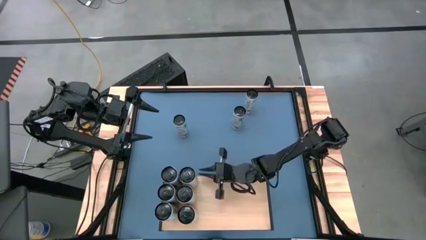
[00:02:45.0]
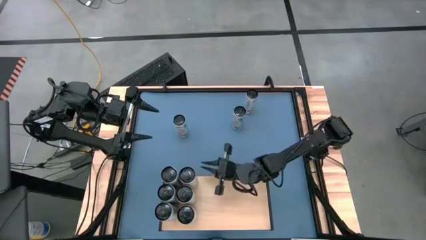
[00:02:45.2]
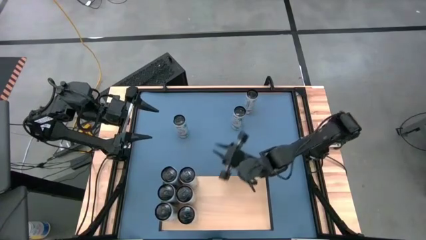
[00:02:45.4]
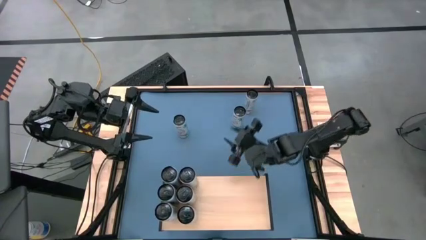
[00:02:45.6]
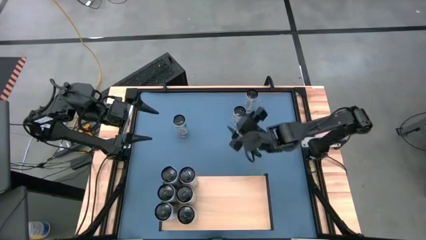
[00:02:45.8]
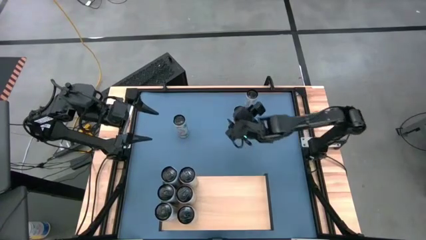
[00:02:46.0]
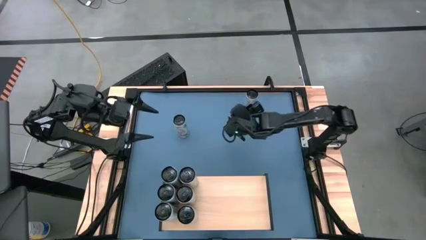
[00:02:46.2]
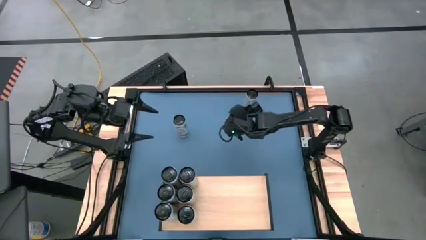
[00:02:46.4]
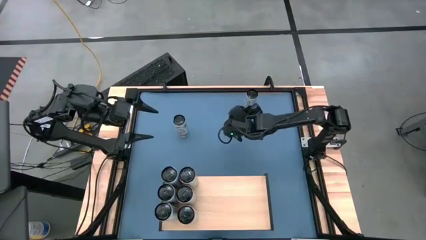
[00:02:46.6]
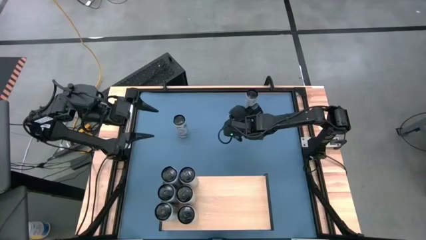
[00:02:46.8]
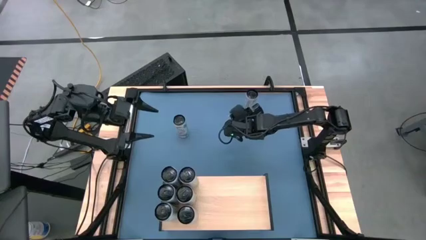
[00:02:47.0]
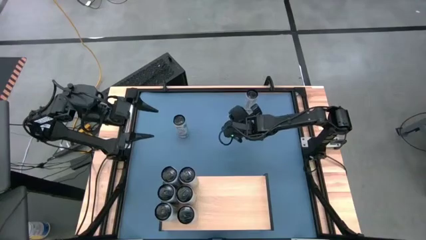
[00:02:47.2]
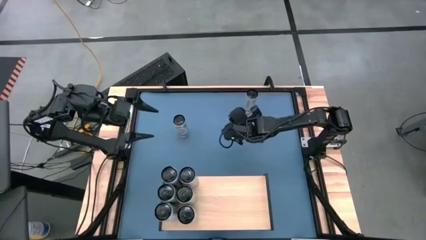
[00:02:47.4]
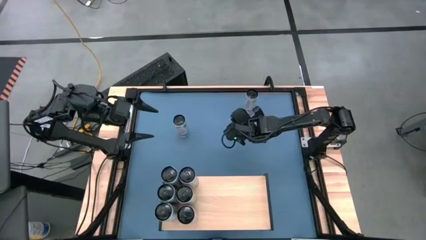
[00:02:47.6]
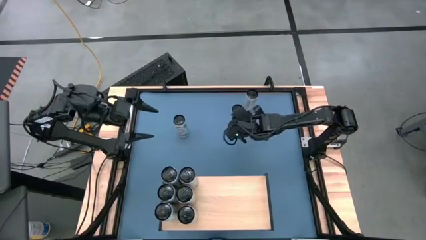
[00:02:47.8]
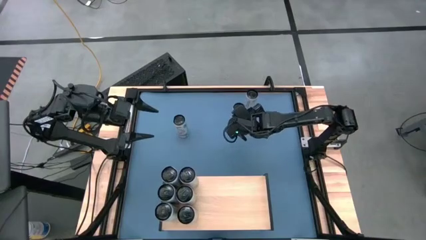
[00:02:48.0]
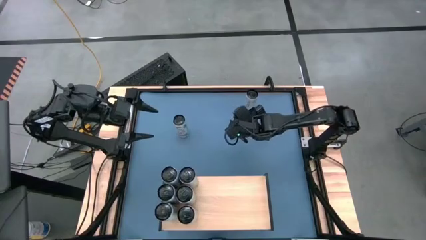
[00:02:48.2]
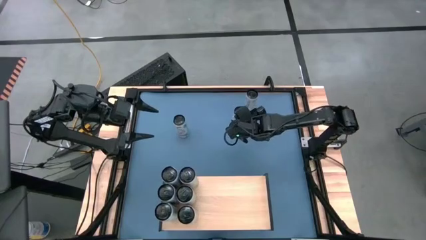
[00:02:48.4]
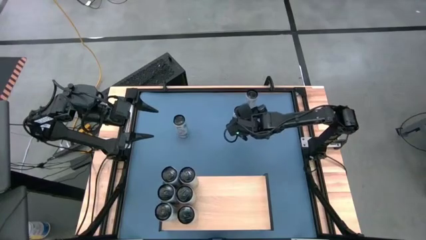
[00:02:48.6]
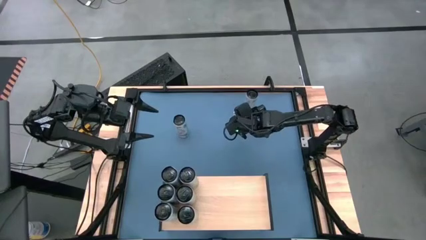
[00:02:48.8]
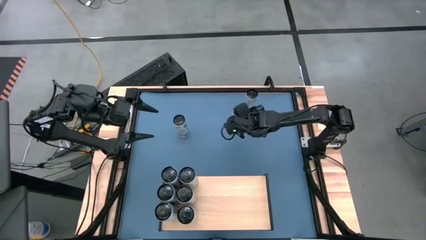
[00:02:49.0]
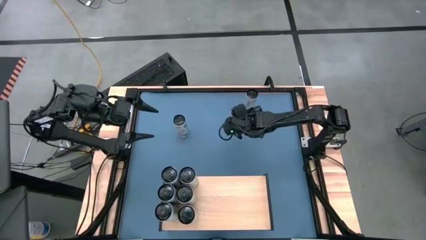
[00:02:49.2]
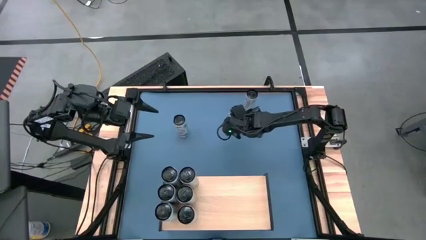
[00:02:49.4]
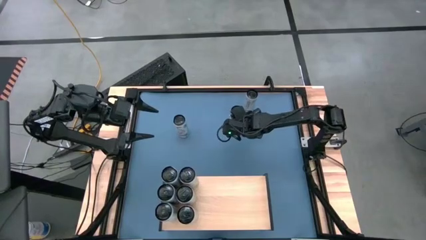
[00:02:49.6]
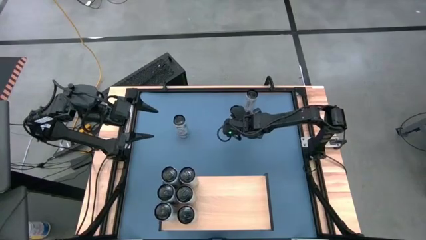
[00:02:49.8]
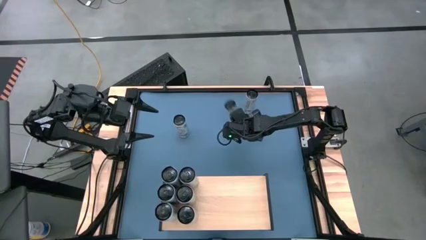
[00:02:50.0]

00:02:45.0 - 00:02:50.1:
Task: Place canned beverage on shelf
Put the bottom right white pink soda can on the shelf

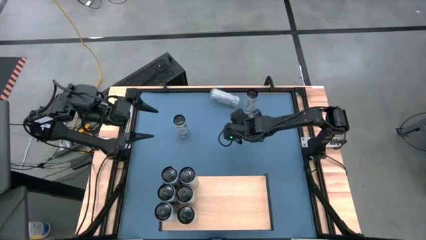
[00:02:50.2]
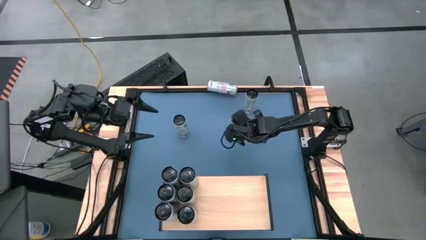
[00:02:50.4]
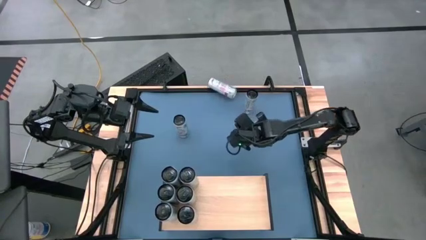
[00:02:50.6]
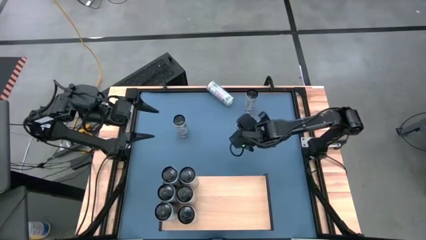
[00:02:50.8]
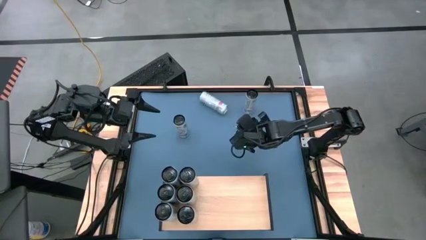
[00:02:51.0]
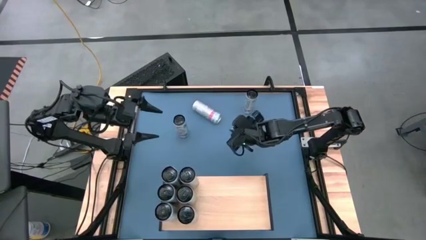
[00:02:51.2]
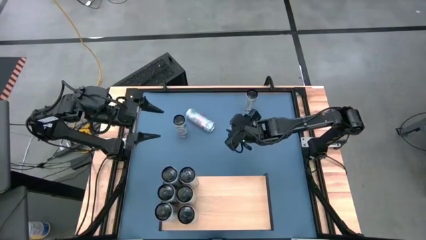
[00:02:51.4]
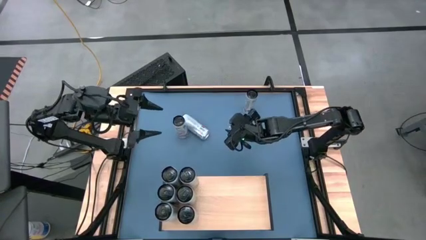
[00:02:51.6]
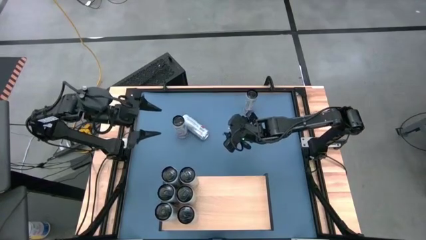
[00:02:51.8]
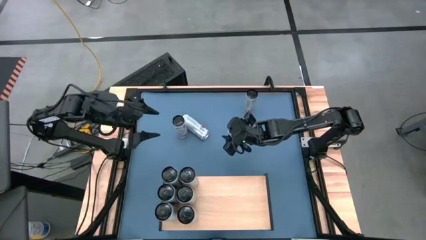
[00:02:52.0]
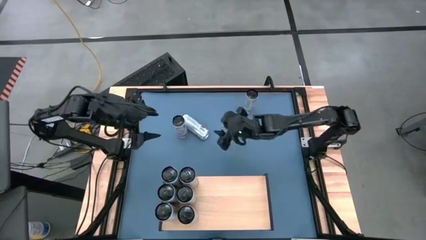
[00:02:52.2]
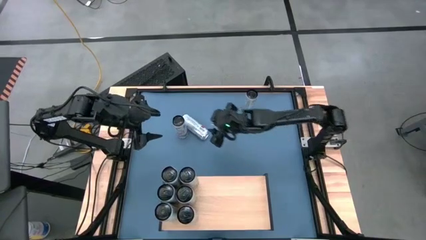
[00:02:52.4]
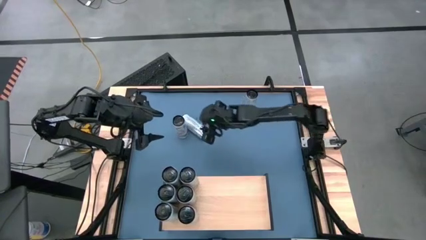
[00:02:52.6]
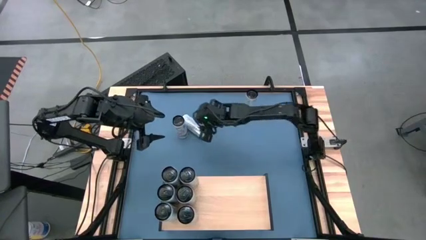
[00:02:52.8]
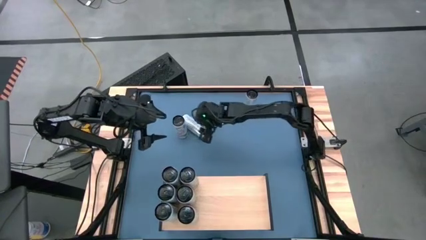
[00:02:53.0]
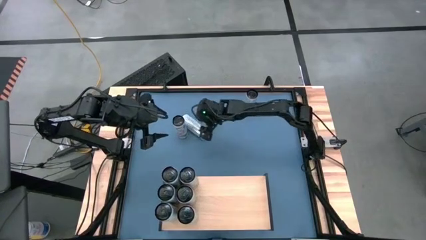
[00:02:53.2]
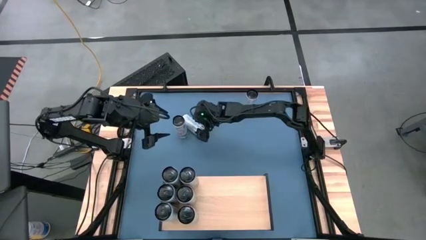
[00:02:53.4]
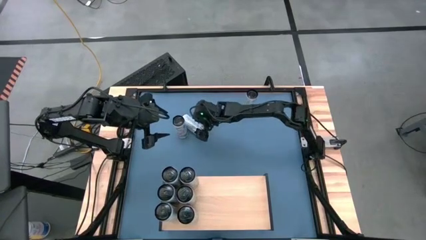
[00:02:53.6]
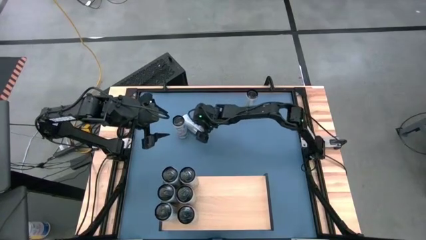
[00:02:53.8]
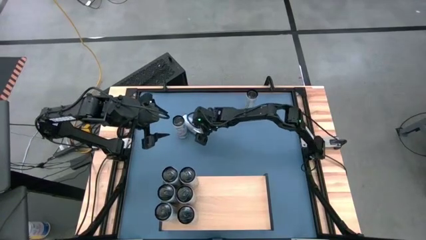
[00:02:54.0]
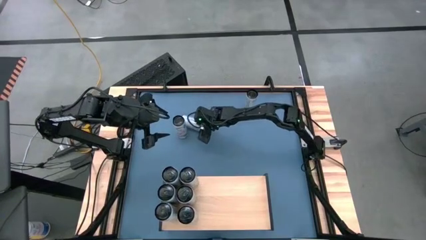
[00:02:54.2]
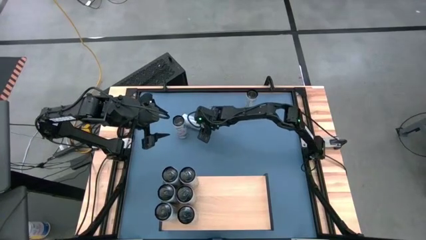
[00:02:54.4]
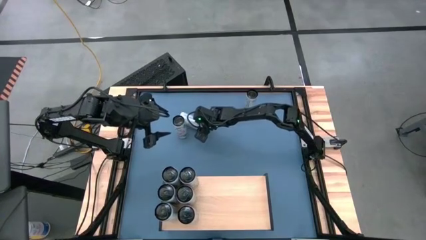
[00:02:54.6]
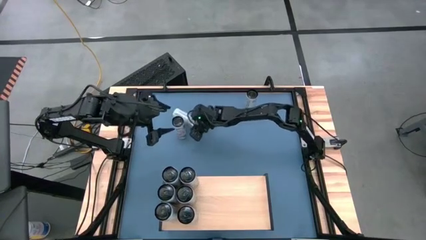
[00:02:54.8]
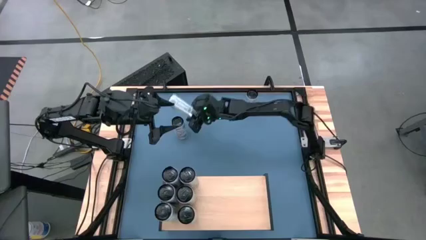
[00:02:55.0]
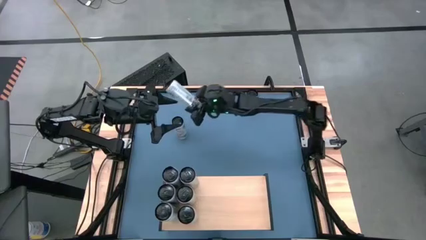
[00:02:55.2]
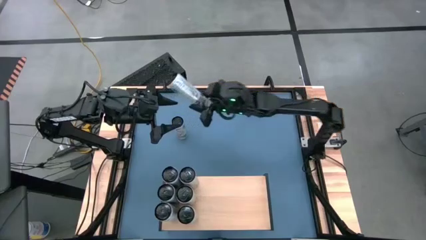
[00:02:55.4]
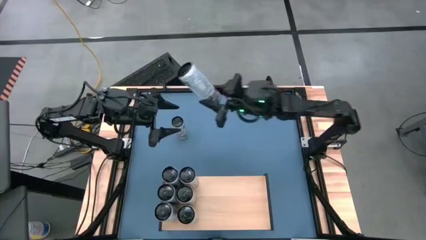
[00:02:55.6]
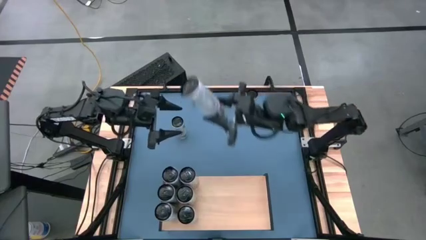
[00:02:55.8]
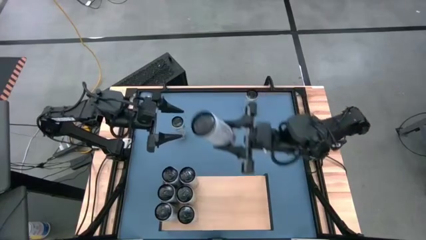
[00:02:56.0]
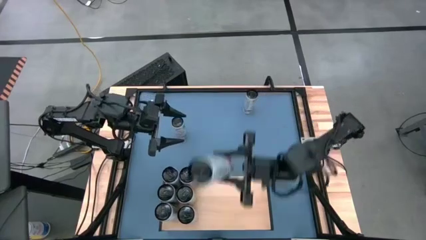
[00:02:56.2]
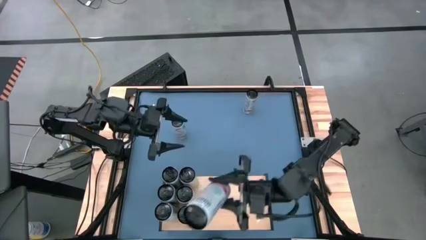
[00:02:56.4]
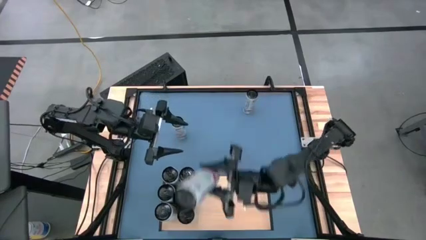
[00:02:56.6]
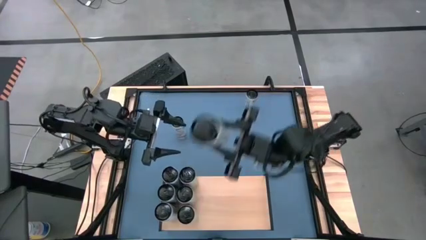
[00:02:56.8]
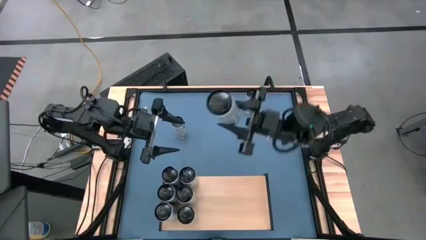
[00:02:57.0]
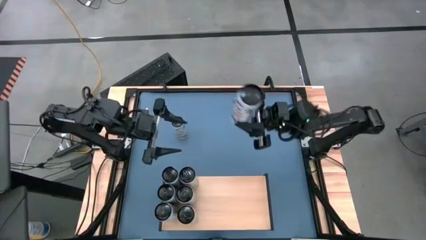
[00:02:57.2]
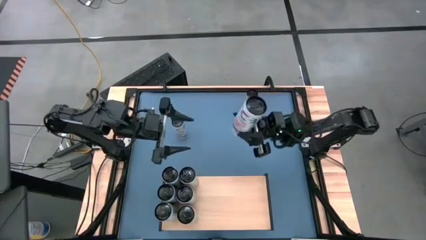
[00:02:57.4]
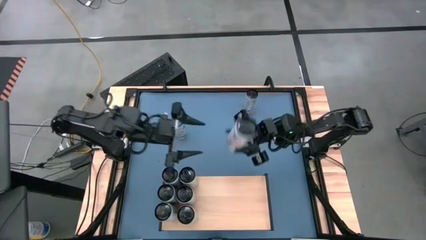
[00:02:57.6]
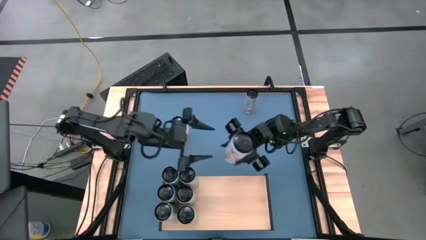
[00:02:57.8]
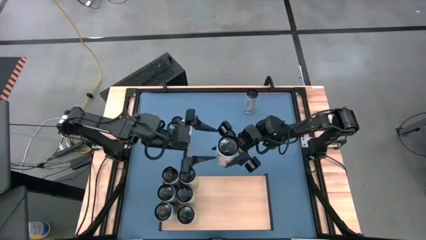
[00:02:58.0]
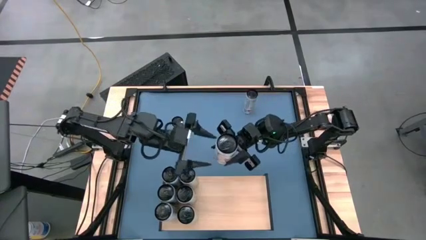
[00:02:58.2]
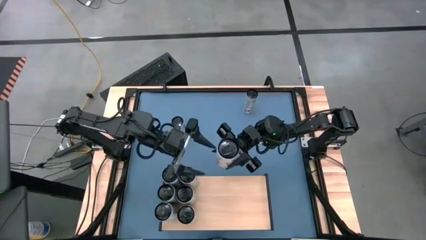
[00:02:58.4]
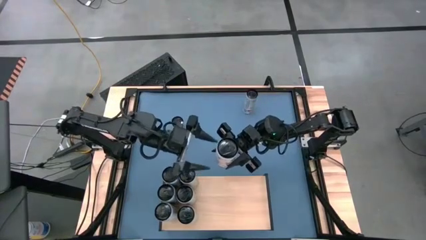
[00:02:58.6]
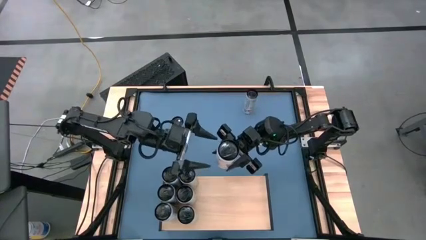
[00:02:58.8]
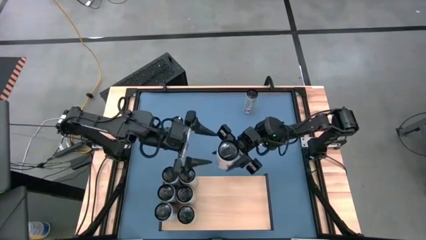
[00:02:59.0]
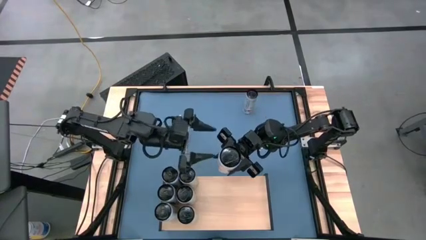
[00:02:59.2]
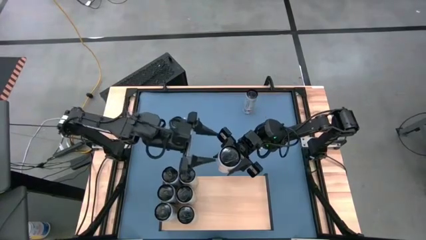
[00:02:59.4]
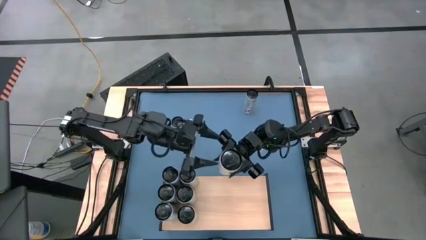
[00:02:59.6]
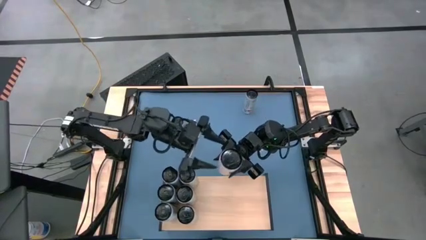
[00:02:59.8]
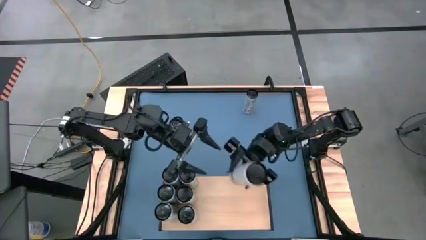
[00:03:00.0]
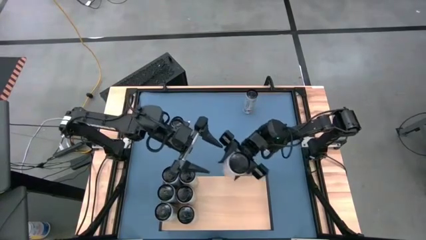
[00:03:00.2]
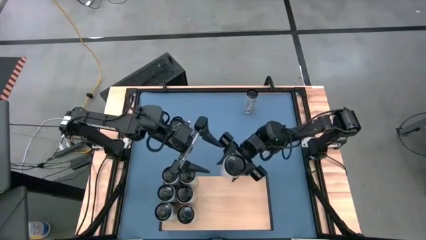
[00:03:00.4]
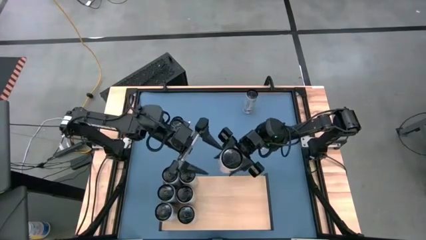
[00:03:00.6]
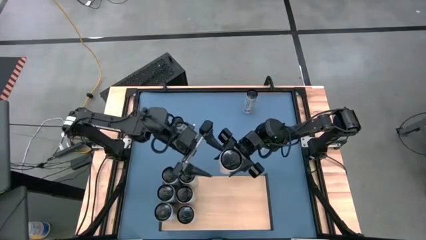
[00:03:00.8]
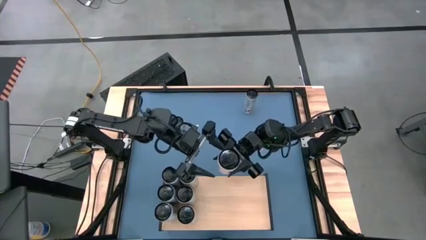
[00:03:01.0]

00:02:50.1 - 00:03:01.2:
Put the bottom right white pink soda can on the shelf
